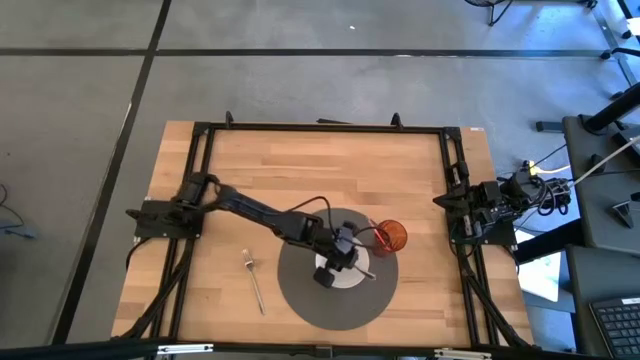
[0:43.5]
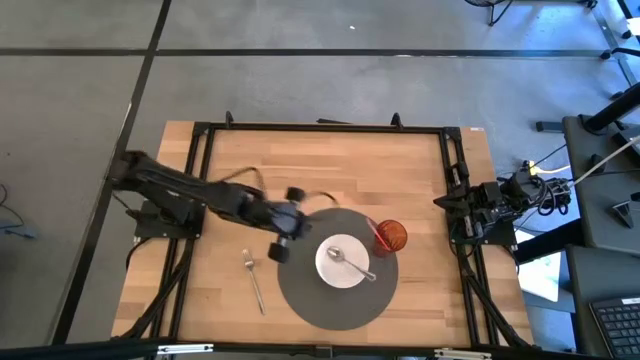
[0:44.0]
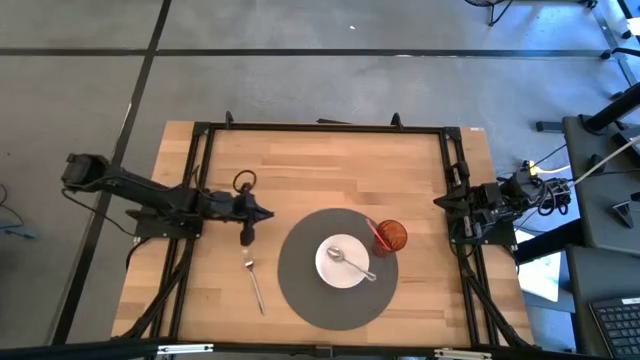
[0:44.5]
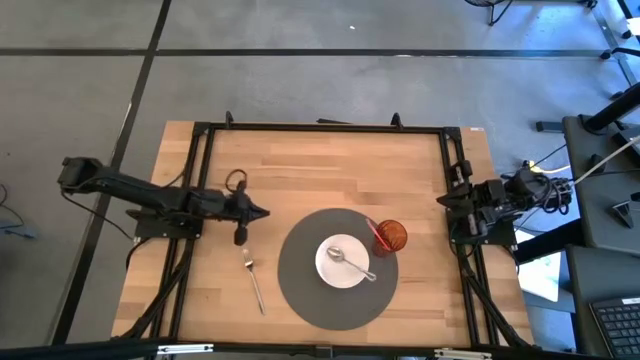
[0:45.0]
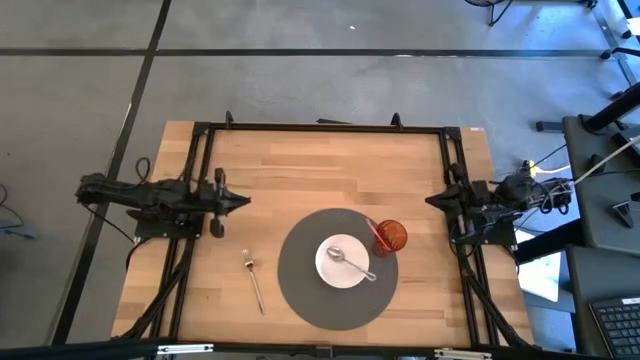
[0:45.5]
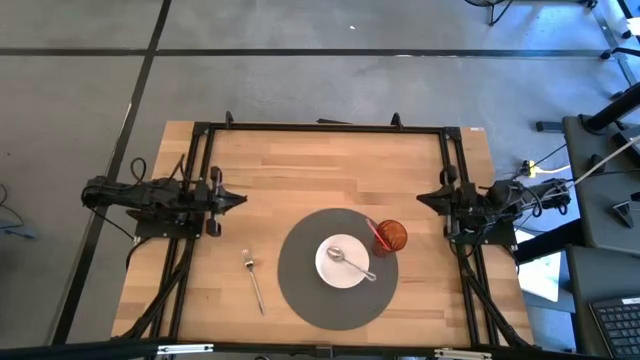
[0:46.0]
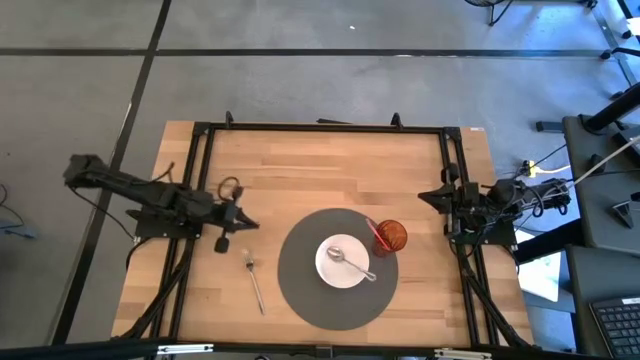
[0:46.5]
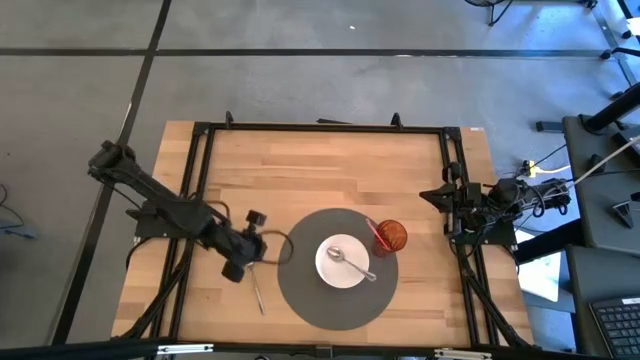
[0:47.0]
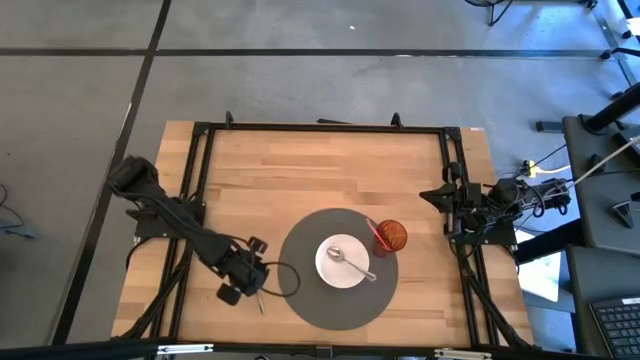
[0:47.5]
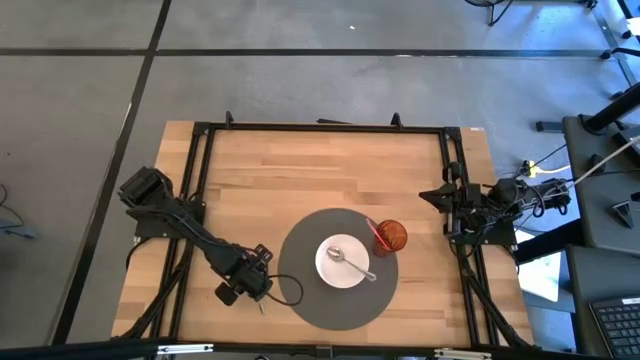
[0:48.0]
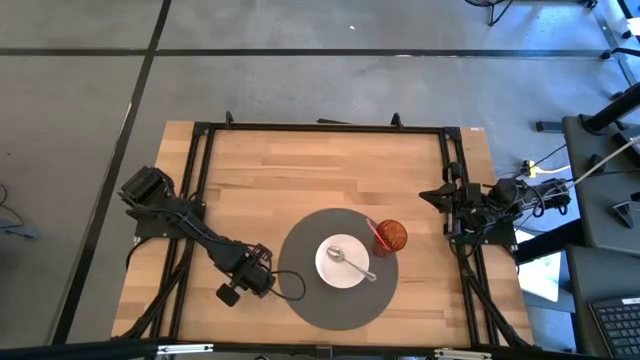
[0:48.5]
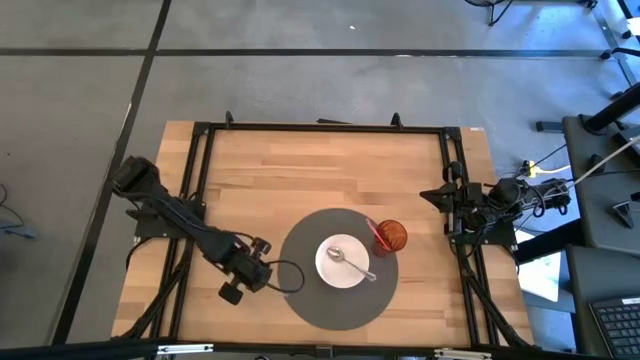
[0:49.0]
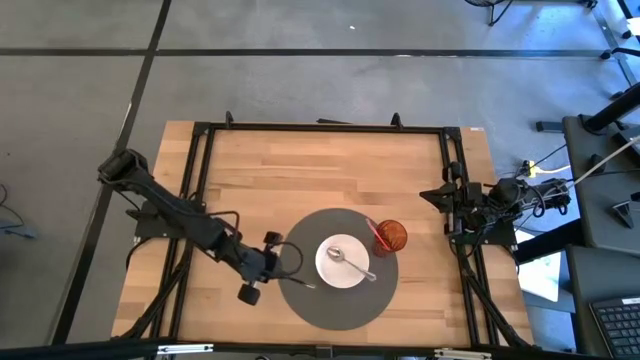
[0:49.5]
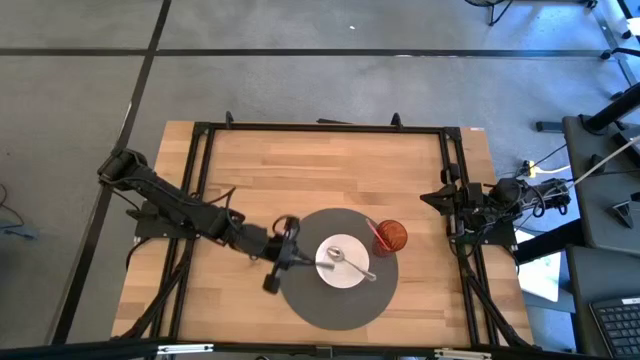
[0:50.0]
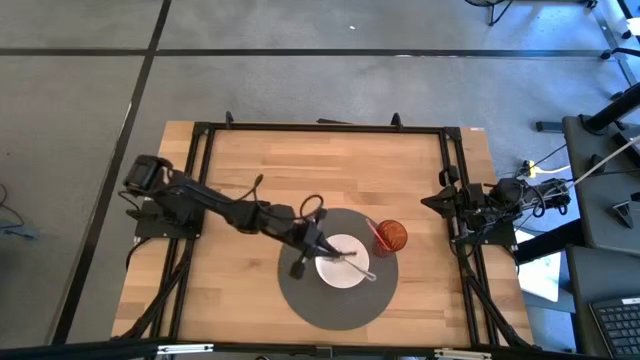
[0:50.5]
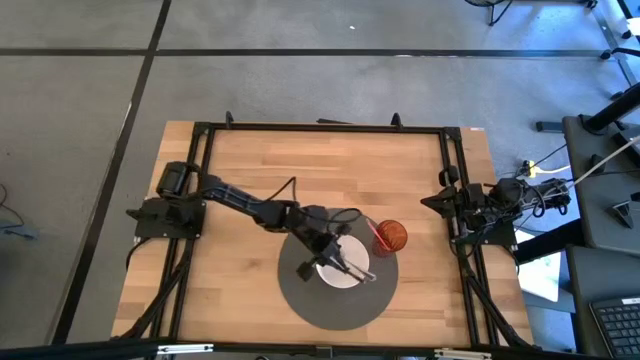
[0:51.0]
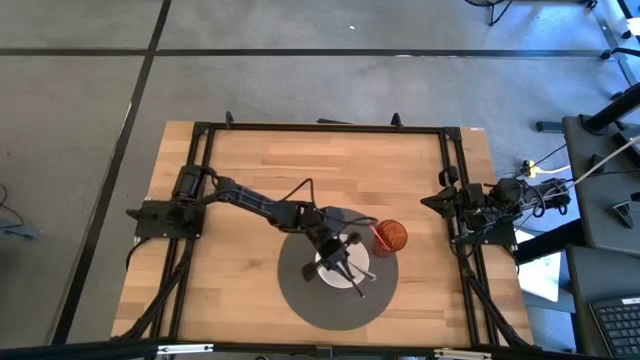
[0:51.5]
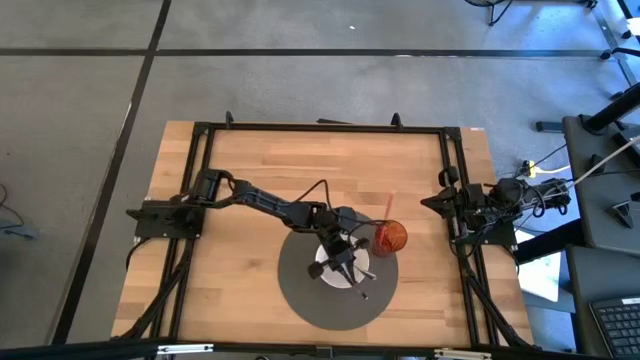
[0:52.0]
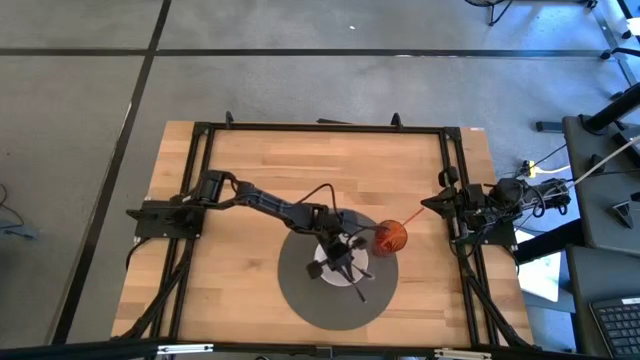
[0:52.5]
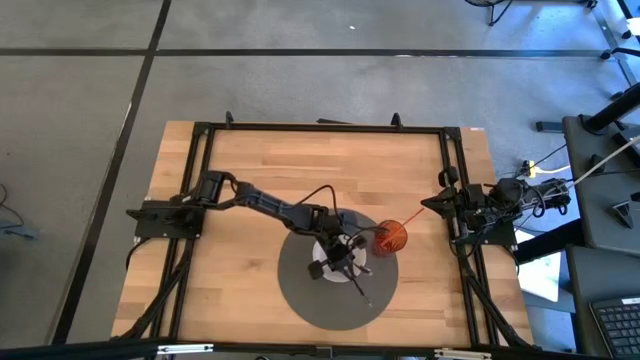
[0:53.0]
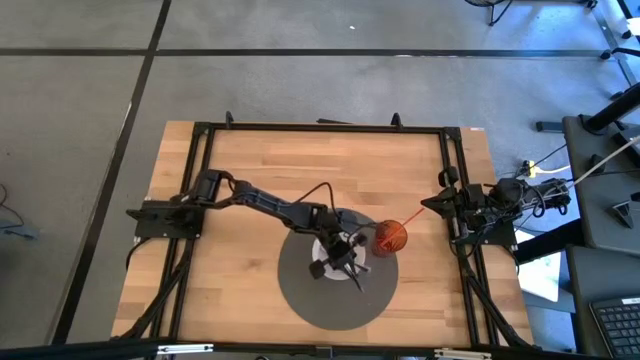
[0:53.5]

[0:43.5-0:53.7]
Task: Pick & Place Utensil
Put the silver fork into the white bowl to the left of the orange glass

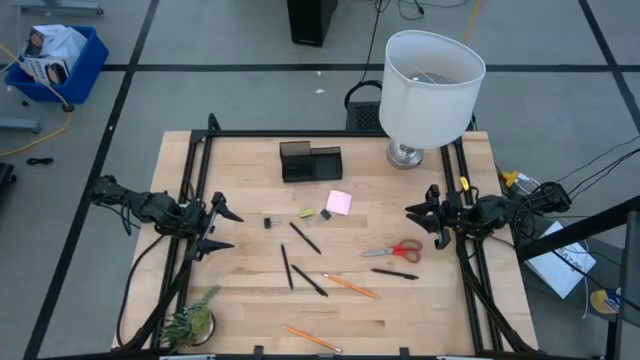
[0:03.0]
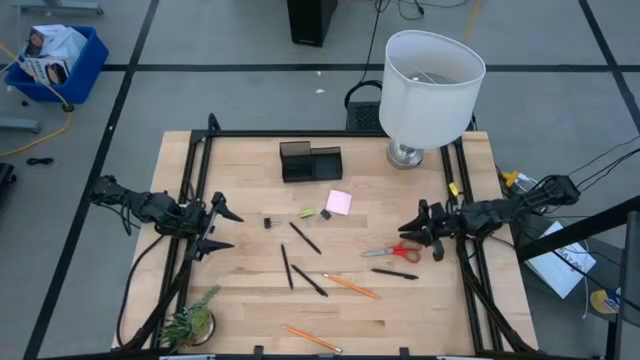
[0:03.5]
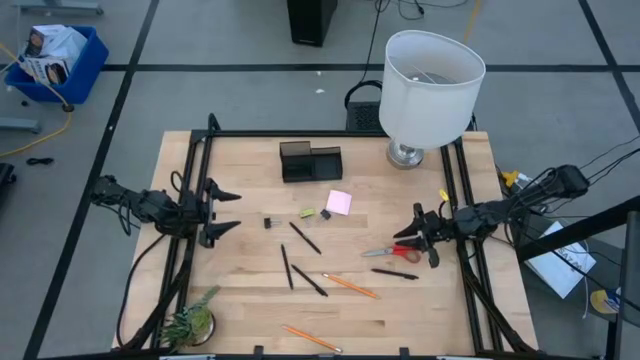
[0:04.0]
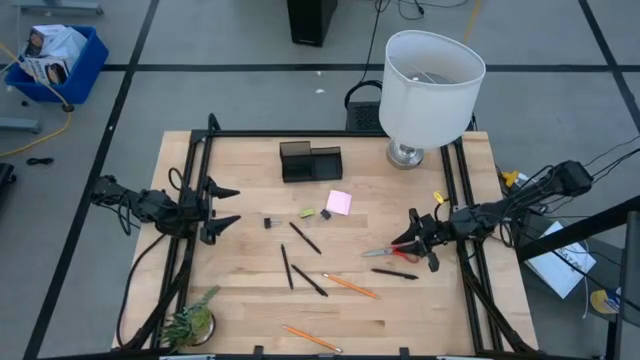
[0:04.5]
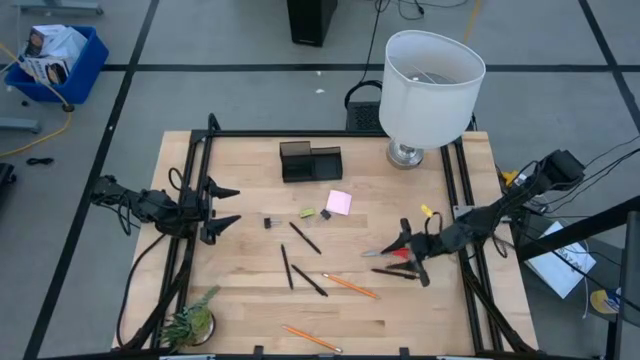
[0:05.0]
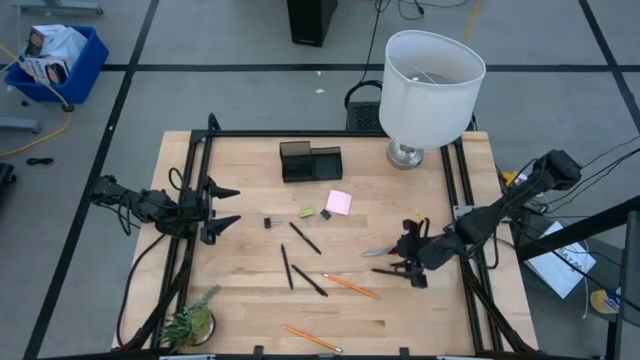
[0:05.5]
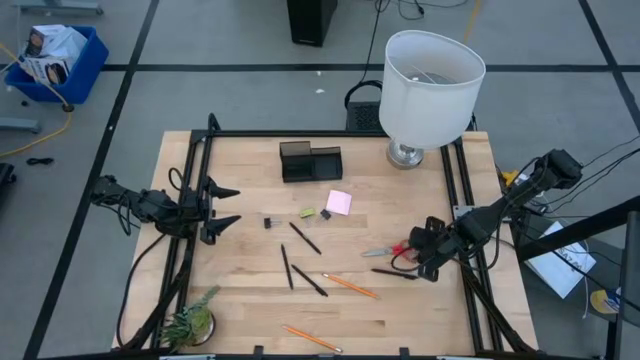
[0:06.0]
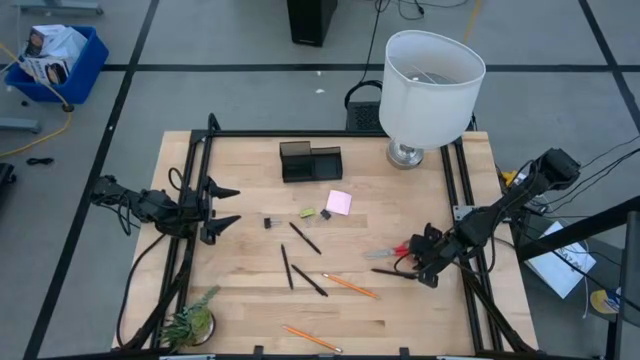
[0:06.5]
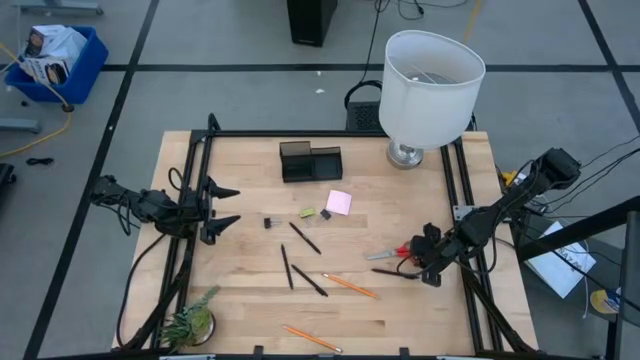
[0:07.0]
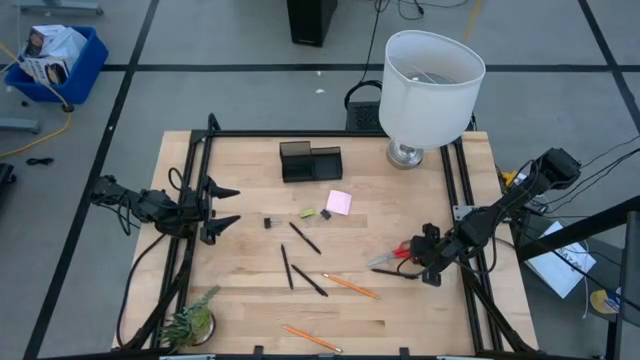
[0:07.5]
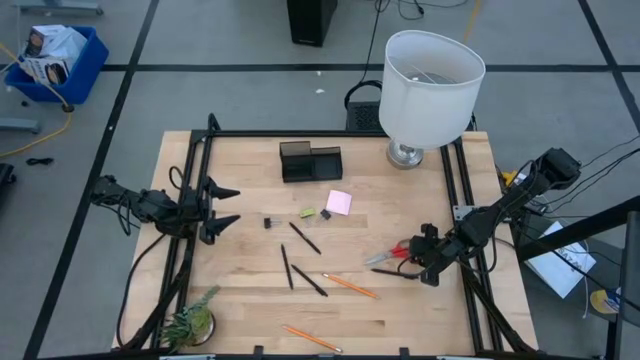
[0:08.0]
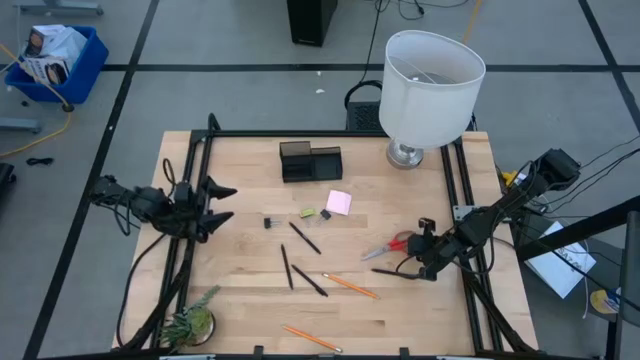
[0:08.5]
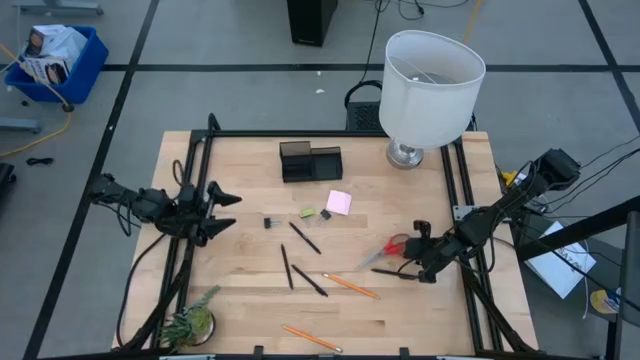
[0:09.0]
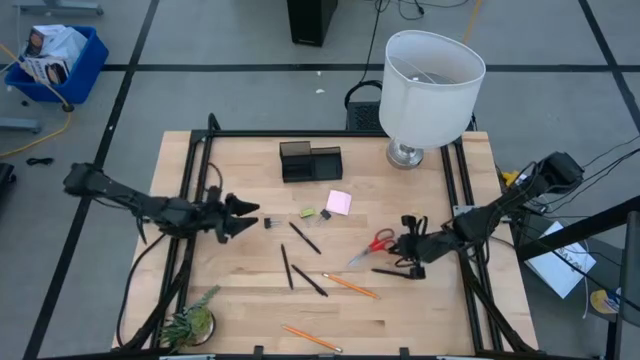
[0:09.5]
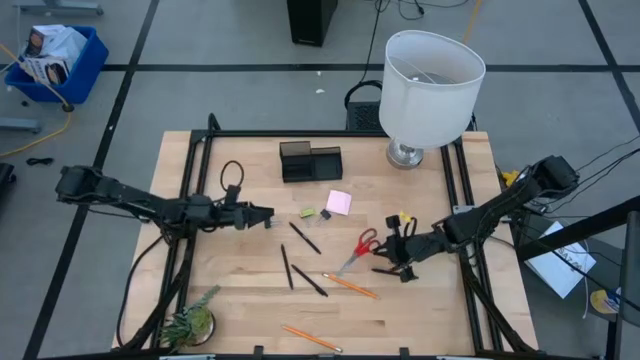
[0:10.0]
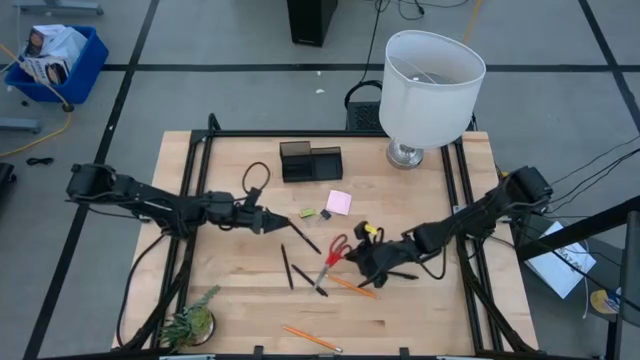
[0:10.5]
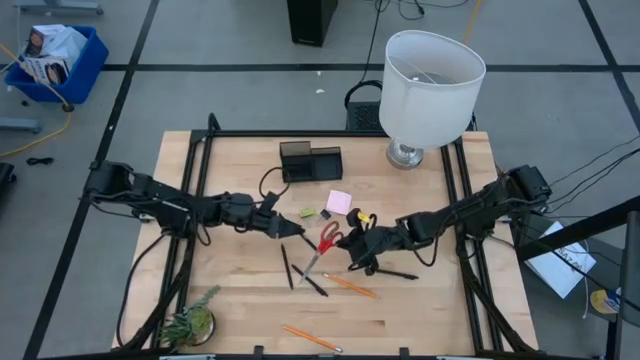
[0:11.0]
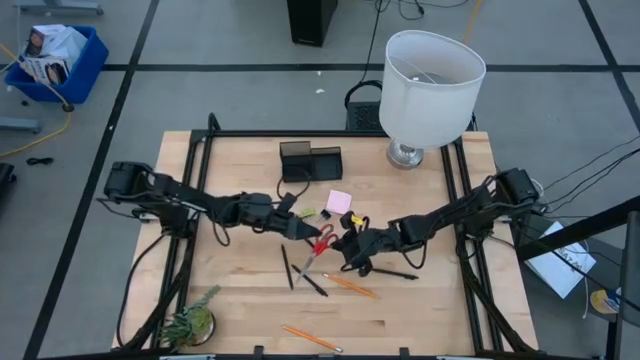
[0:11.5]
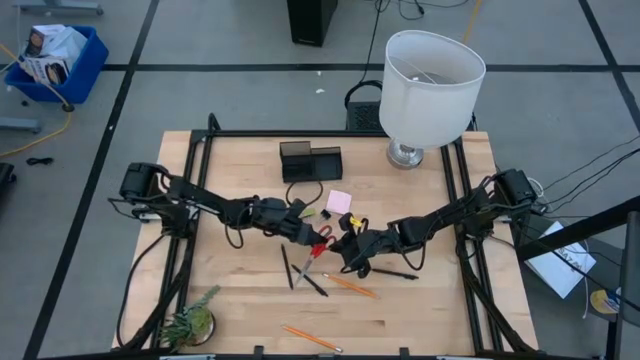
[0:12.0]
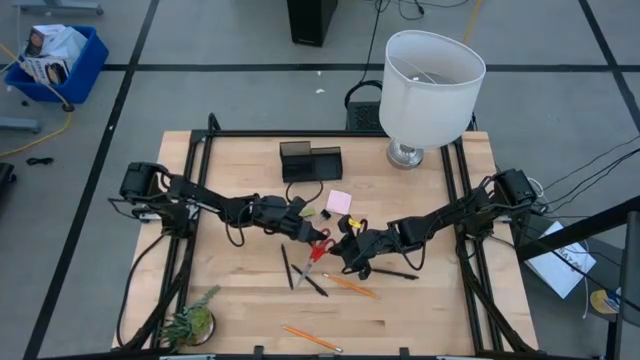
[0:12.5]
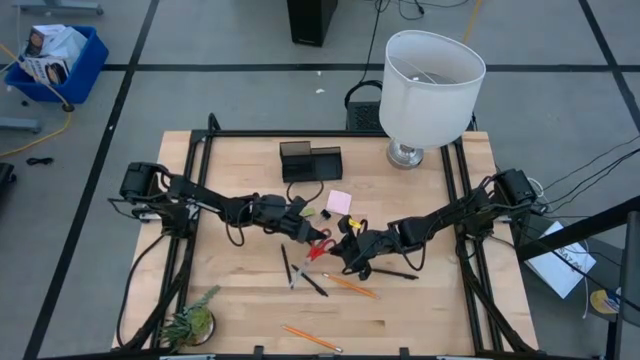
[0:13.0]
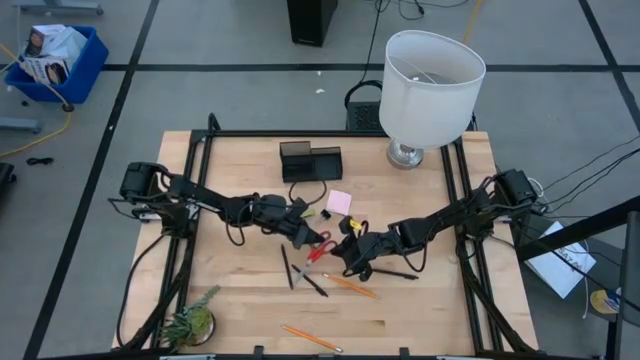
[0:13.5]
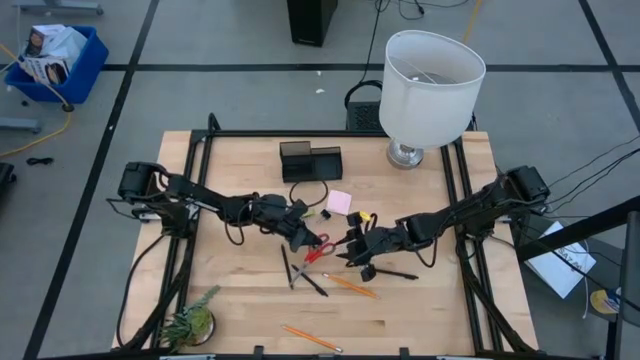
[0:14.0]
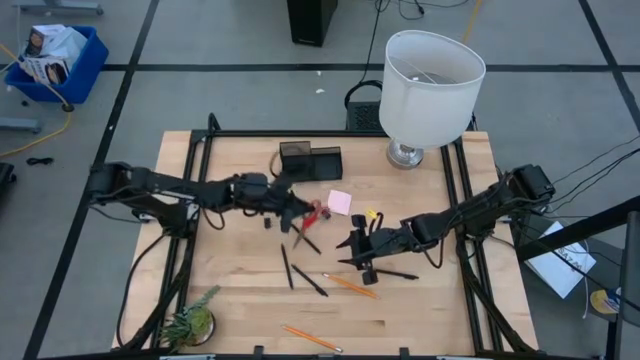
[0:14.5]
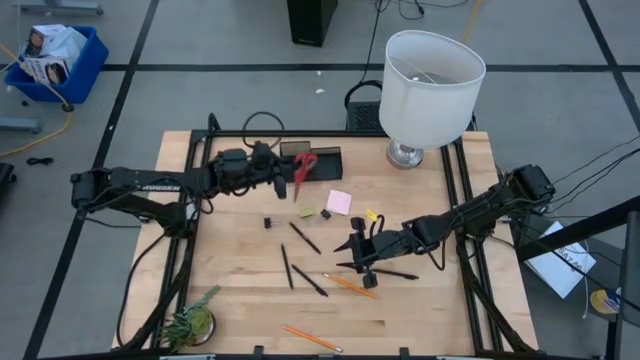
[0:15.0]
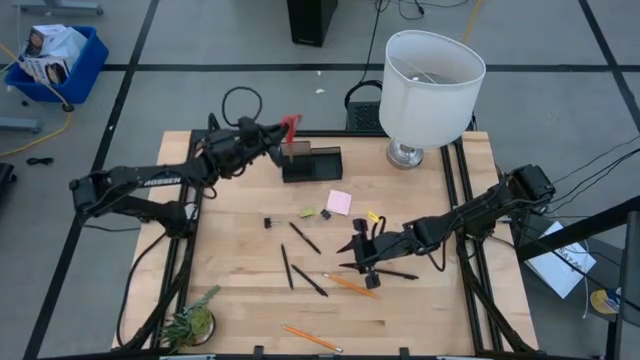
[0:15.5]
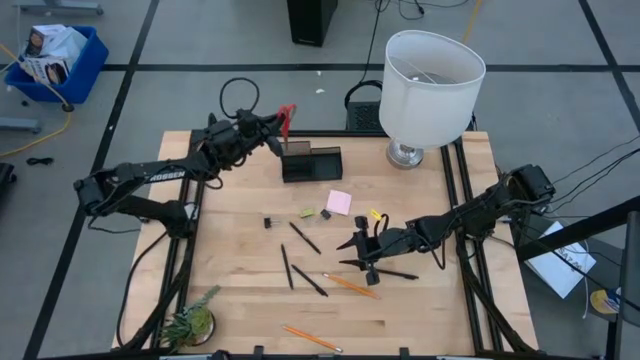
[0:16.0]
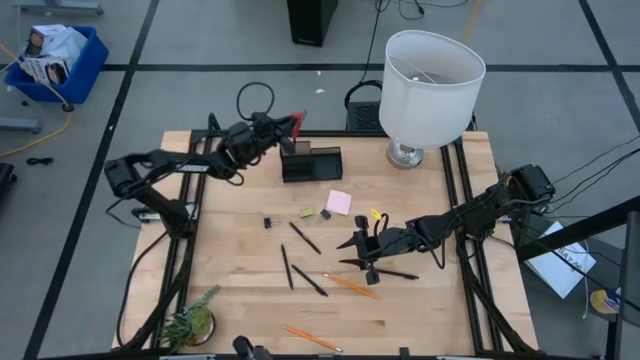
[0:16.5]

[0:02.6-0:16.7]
Task: Pick and place office supplies into organizer
Put the red scissors into the black desk organizer
